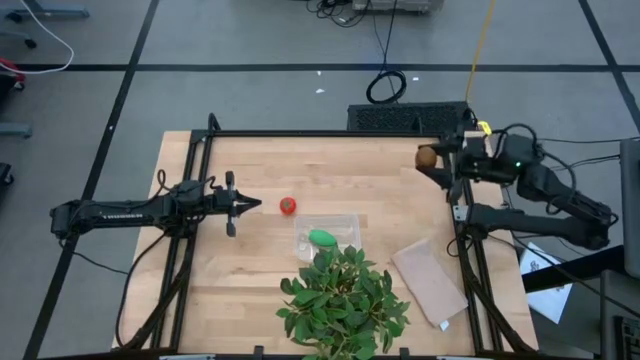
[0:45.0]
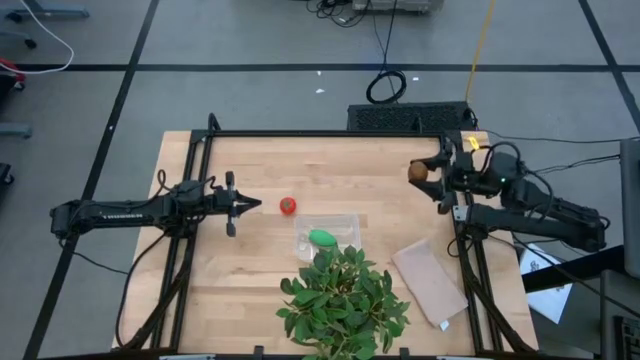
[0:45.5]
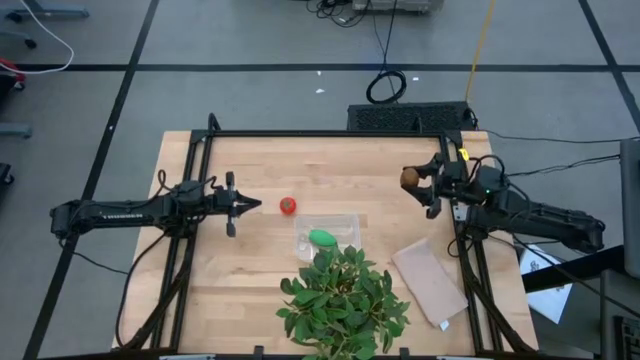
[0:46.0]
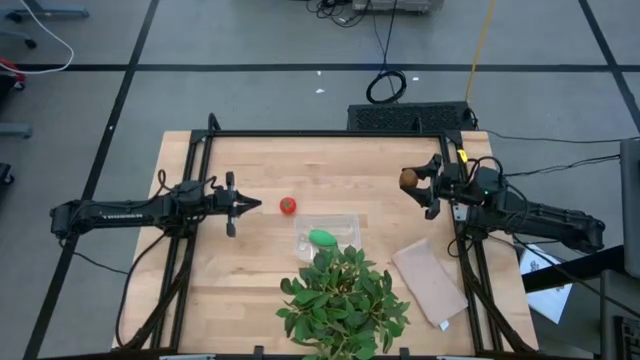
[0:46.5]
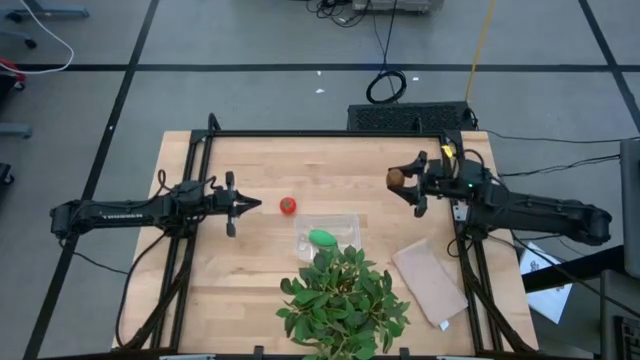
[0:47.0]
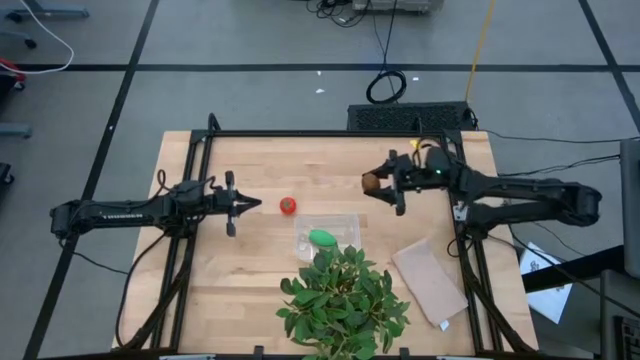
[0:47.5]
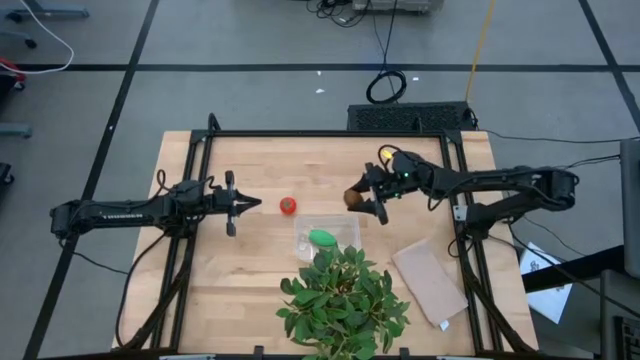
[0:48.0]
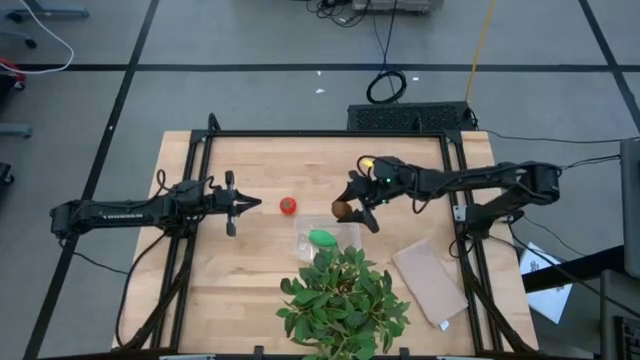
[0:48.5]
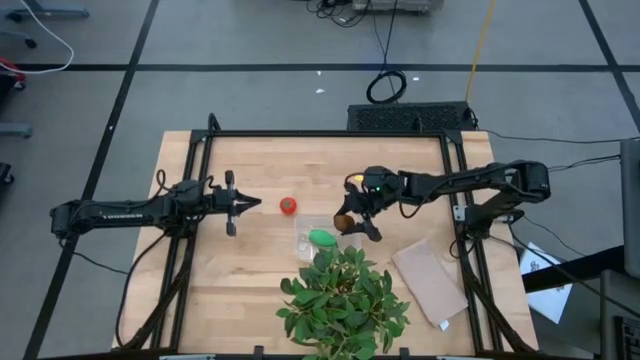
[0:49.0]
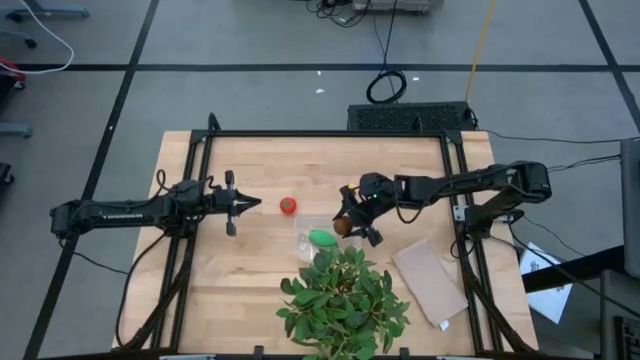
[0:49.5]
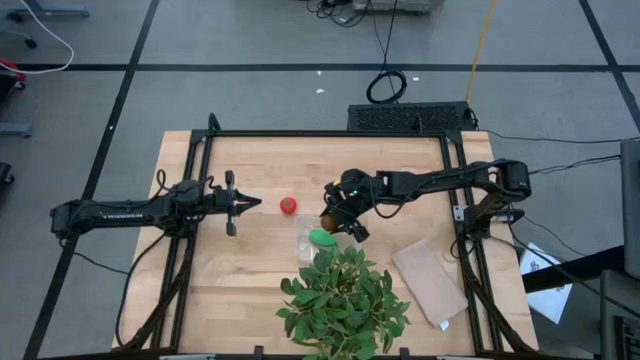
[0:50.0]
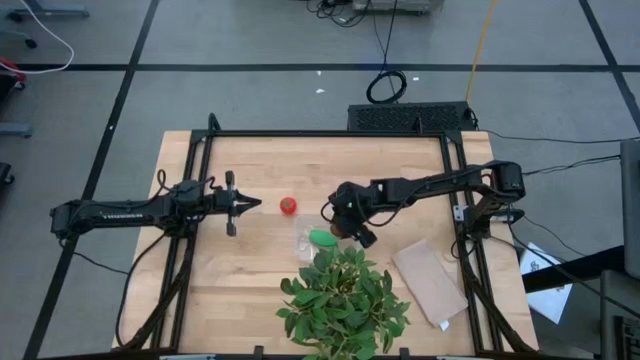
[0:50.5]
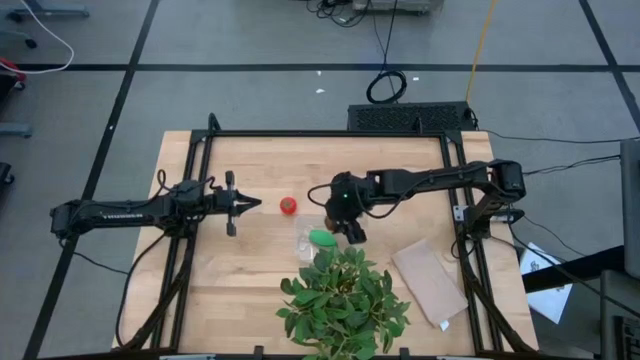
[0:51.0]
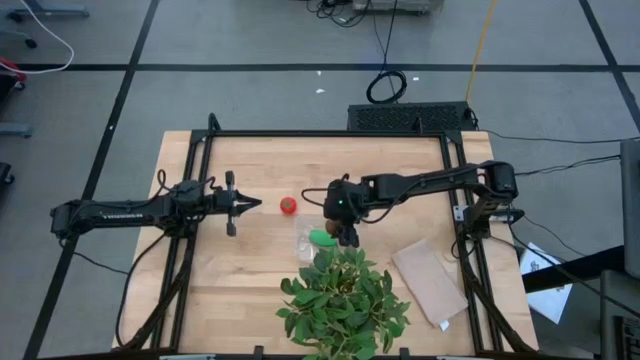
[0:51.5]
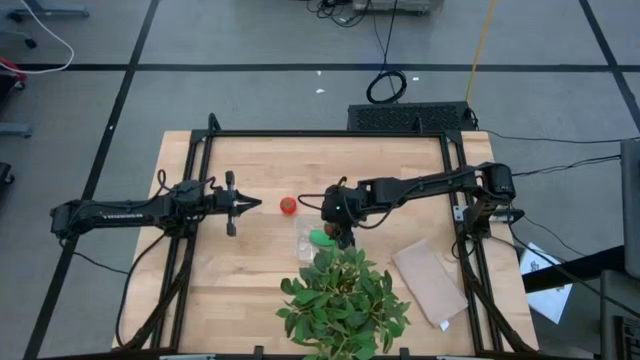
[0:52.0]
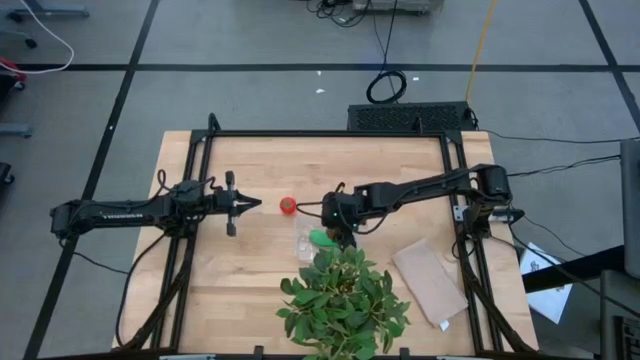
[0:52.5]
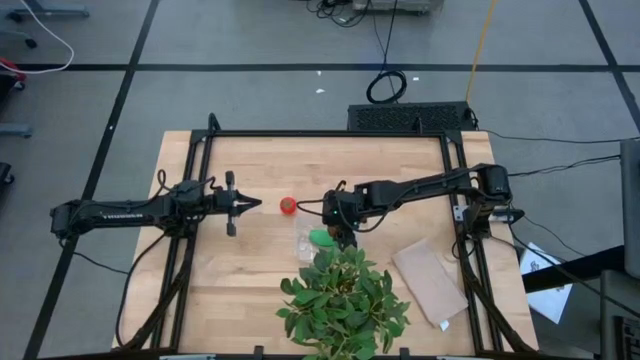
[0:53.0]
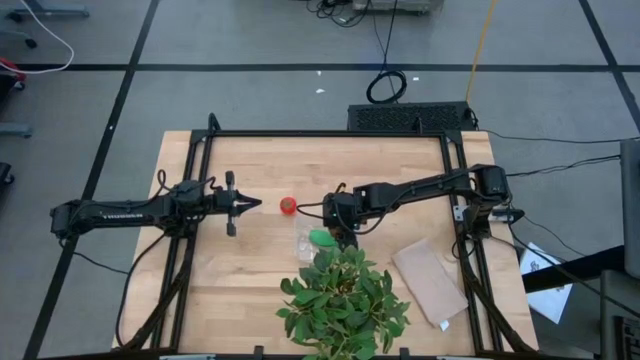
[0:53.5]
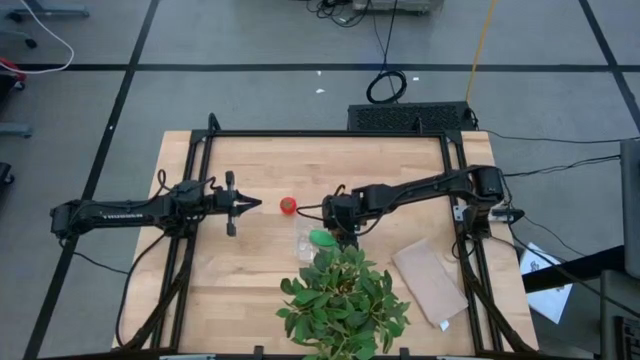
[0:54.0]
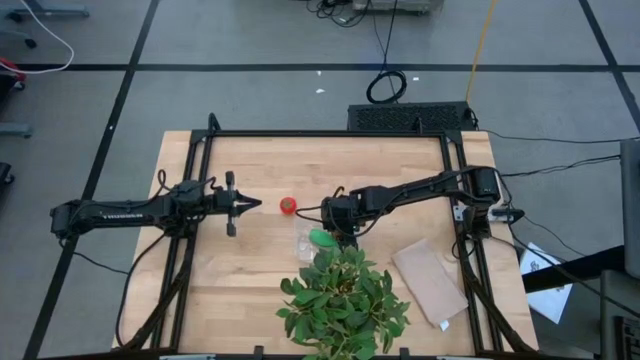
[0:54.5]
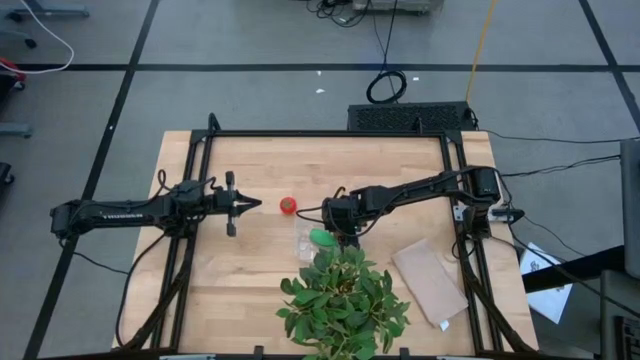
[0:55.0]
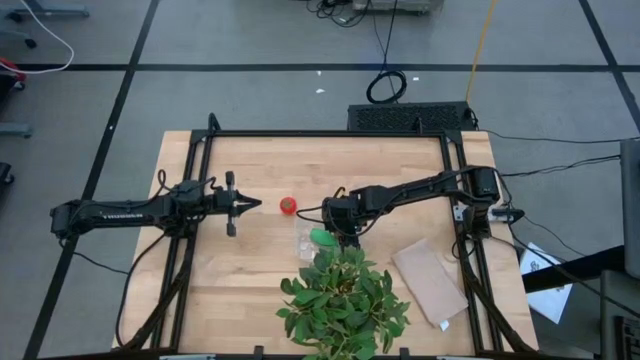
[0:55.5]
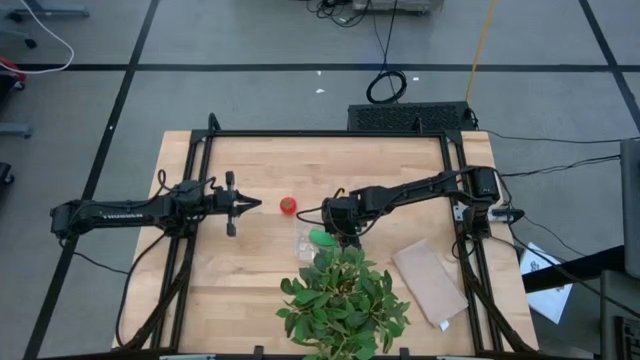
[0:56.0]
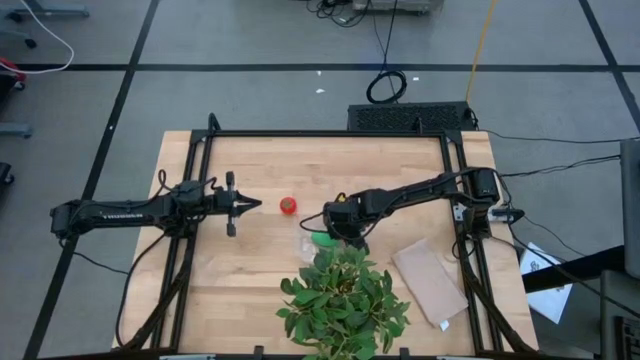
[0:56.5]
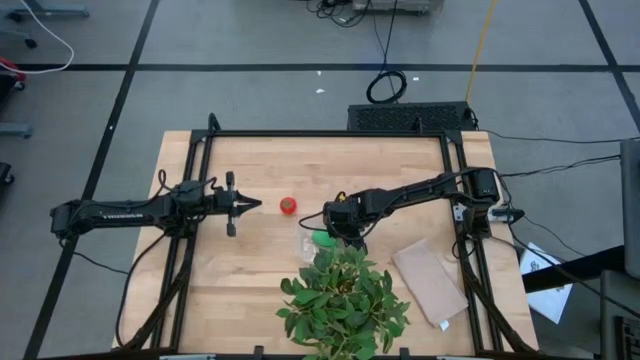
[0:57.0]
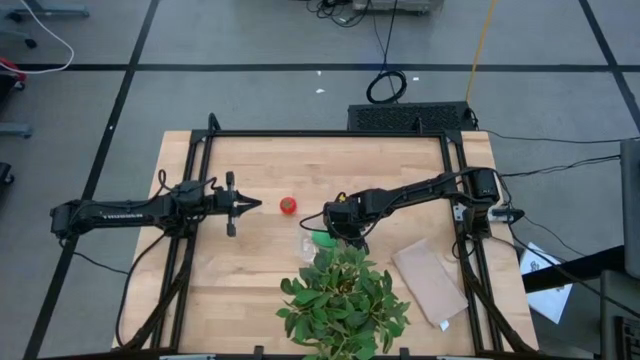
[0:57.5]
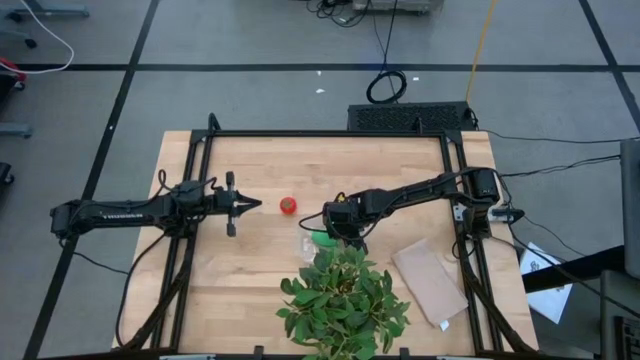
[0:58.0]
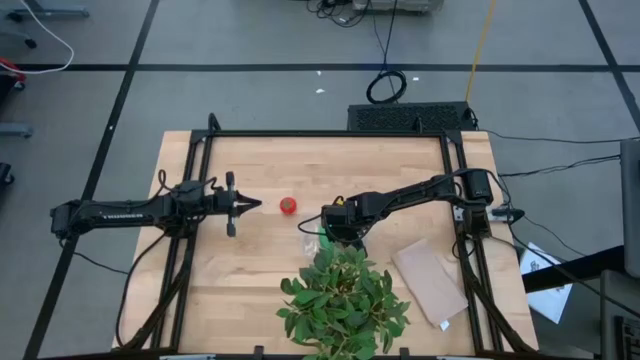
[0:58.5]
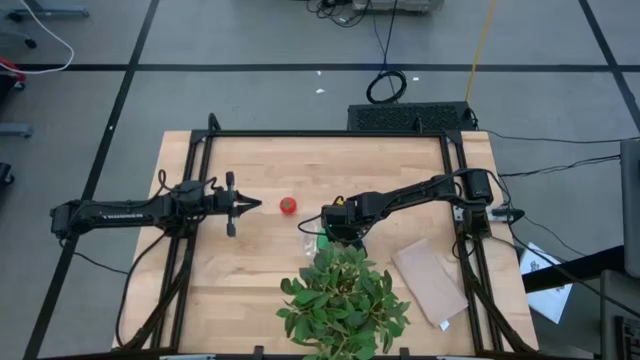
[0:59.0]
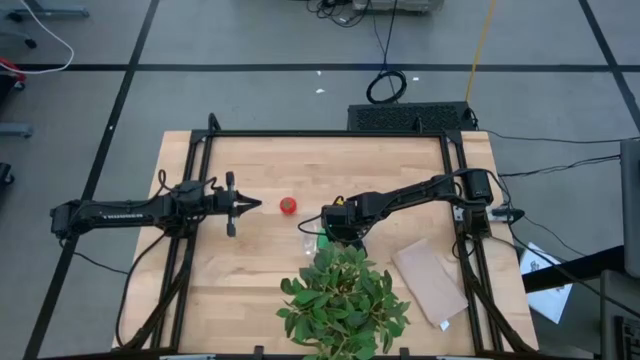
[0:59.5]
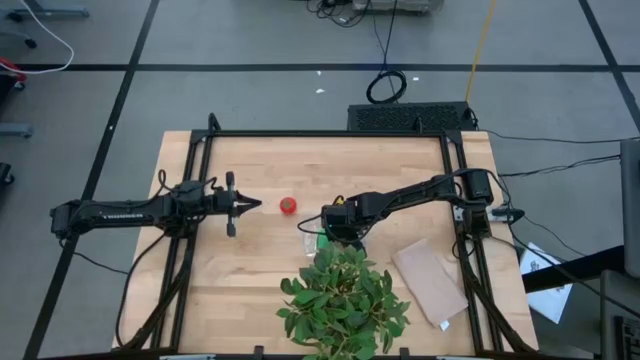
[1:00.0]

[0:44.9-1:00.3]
Task: Pick and placing Produce into tupperware
Put the brown kiwi into the transparent bin

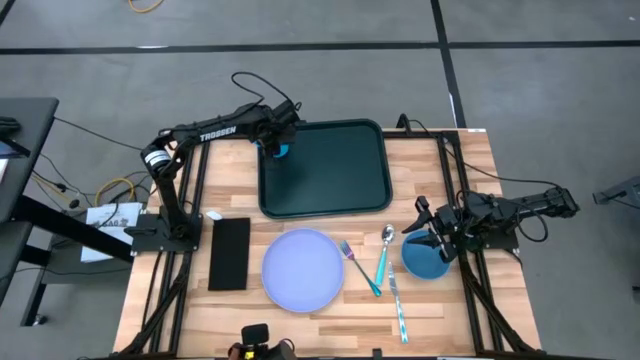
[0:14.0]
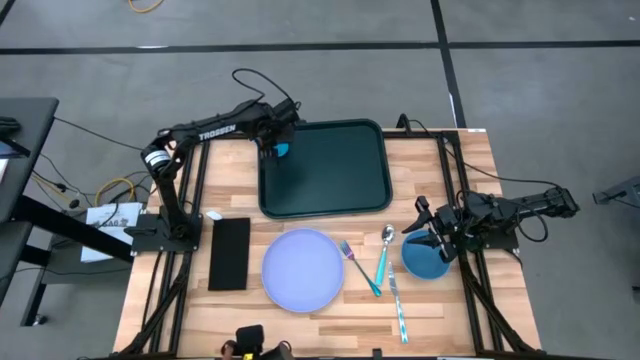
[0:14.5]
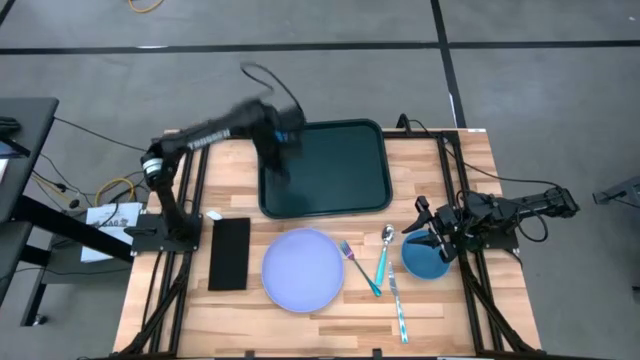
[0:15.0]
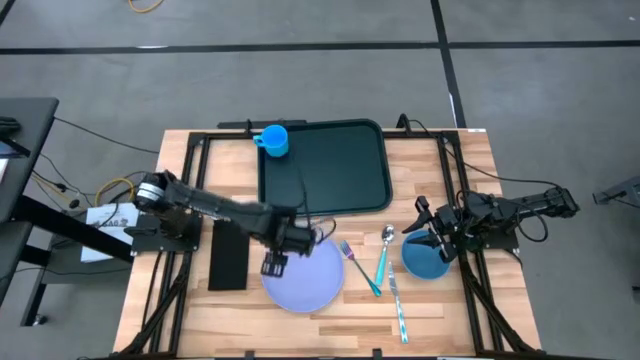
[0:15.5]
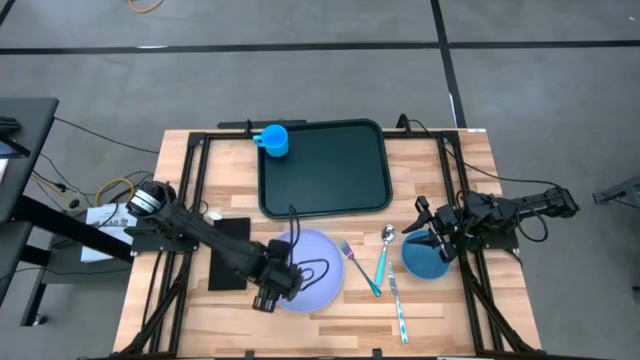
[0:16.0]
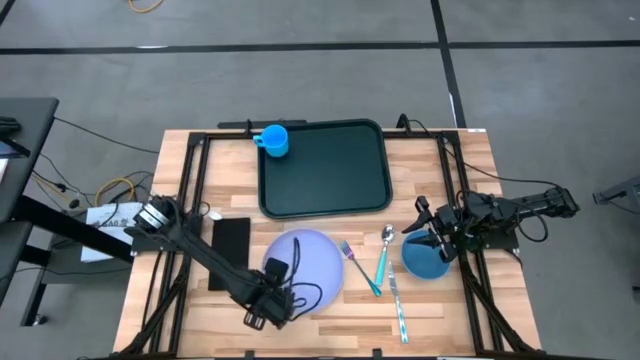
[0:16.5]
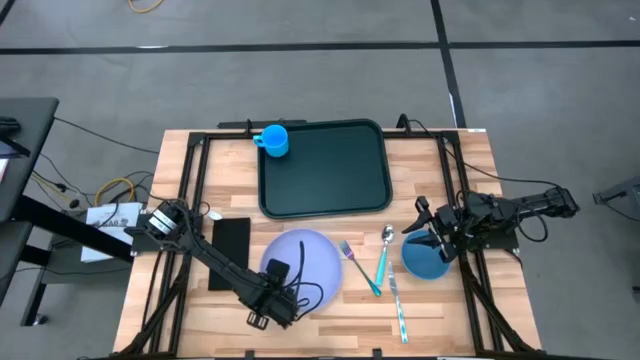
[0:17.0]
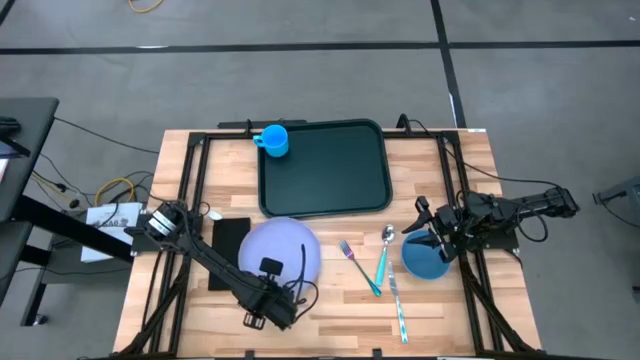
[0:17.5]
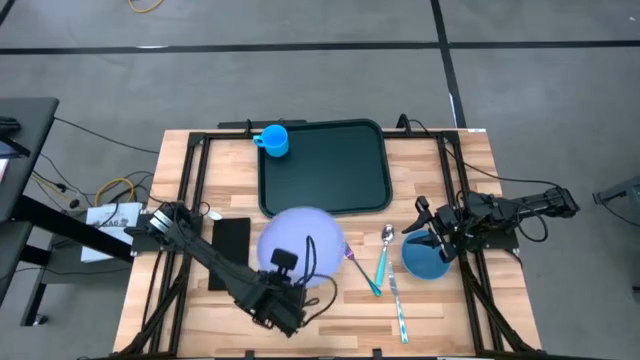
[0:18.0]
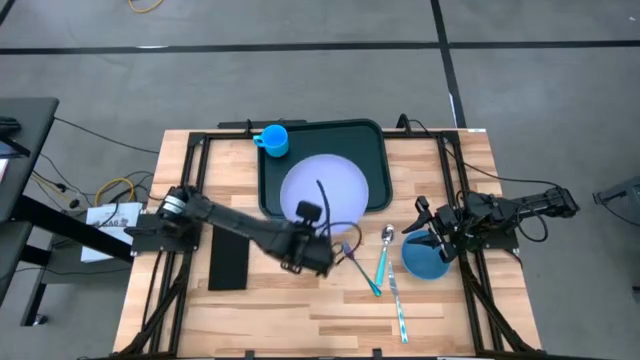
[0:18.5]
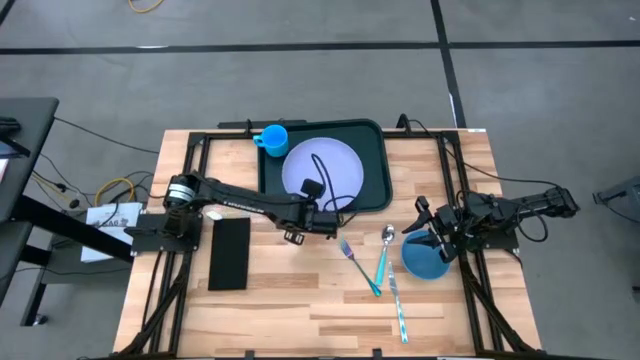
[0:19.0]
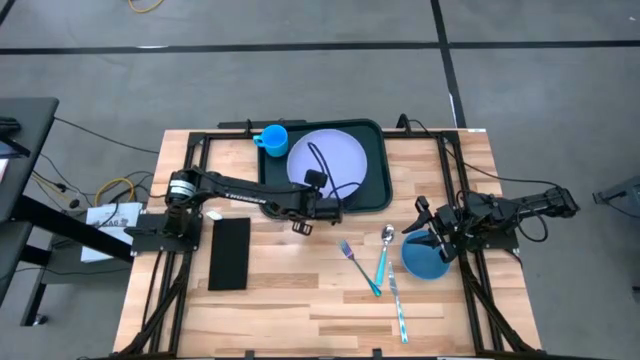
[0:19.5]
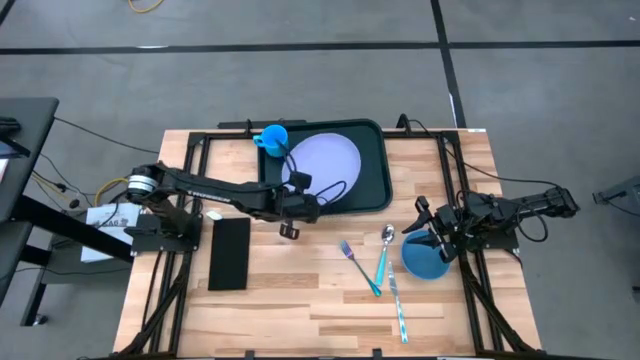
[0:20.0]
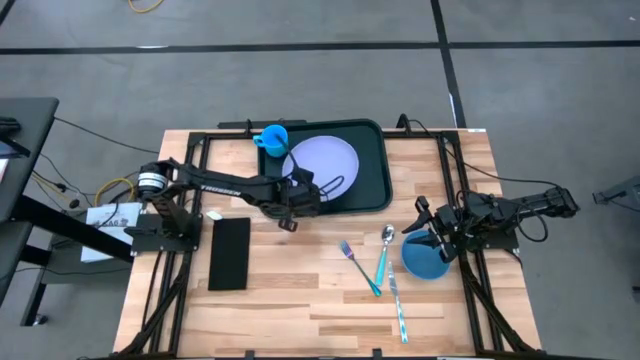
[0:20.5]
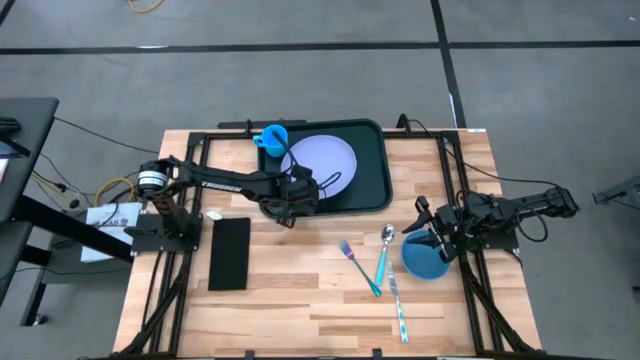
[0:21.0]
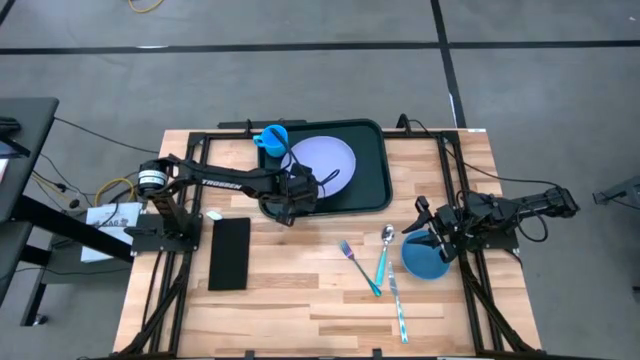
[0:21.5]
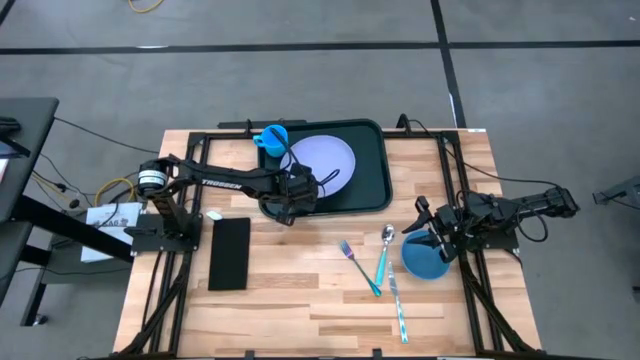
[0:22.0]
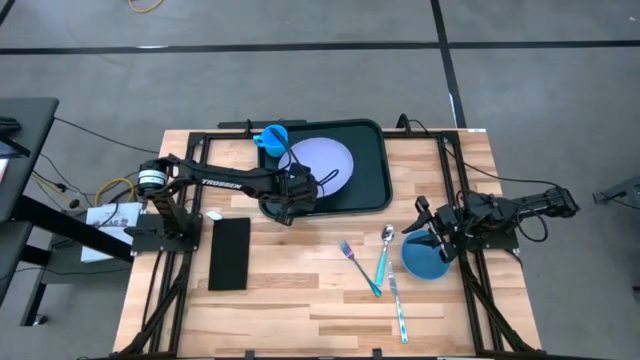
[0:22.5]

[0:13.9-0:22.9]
Task: Set up tray
Put the purple plate on the black tray to the bottom right of the blue mug
